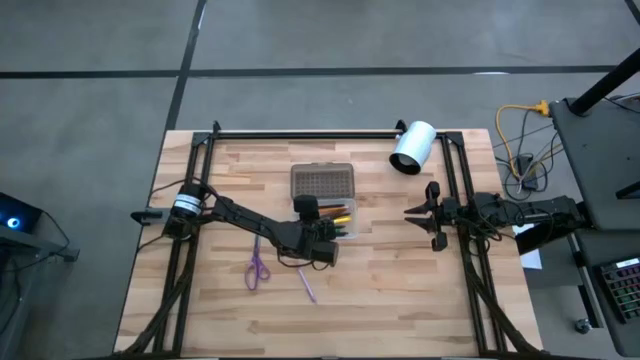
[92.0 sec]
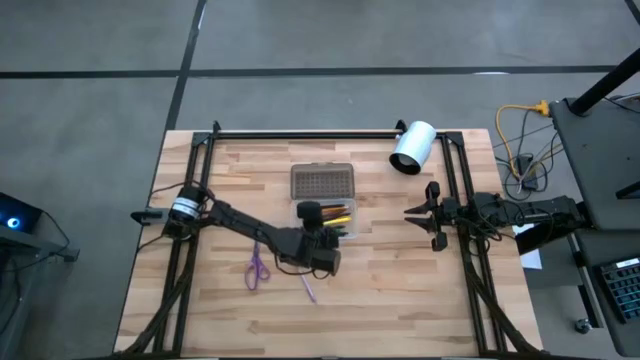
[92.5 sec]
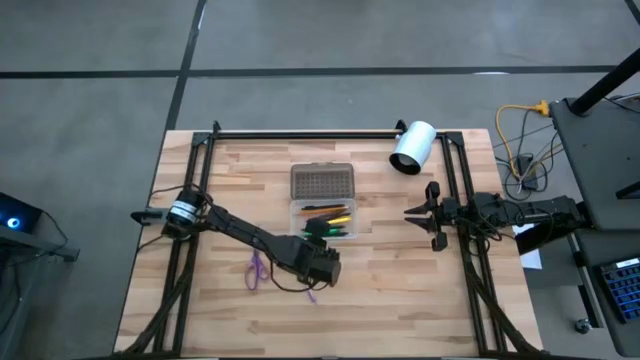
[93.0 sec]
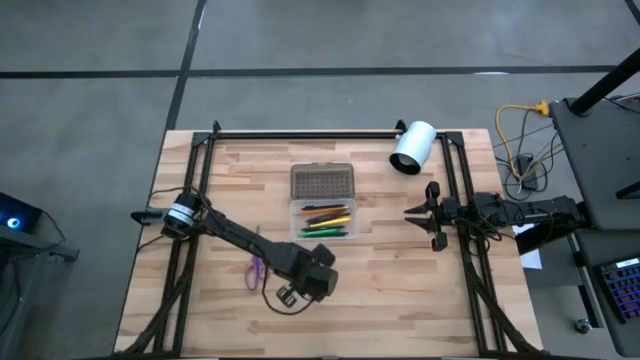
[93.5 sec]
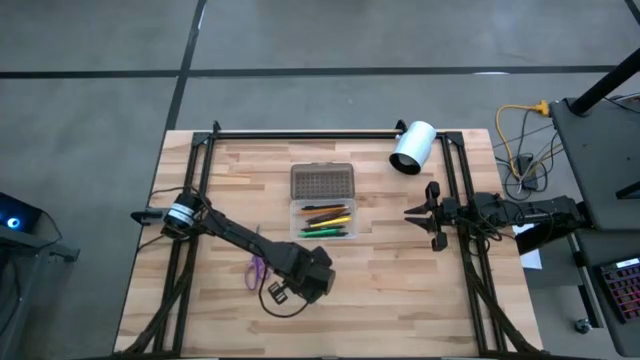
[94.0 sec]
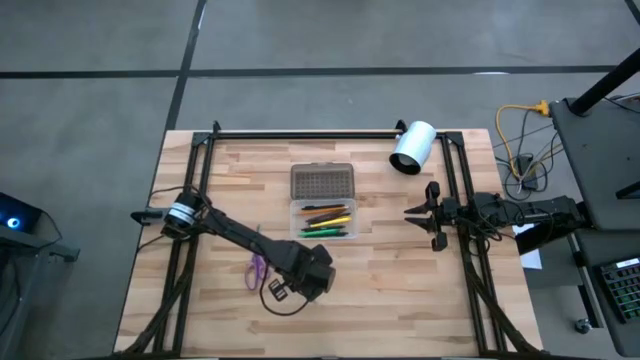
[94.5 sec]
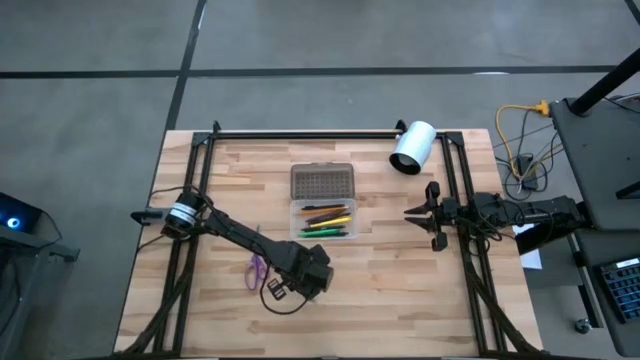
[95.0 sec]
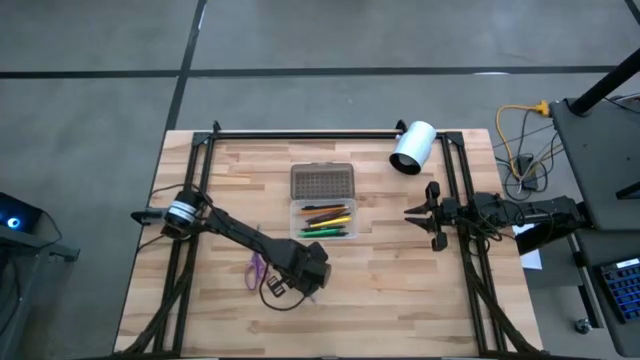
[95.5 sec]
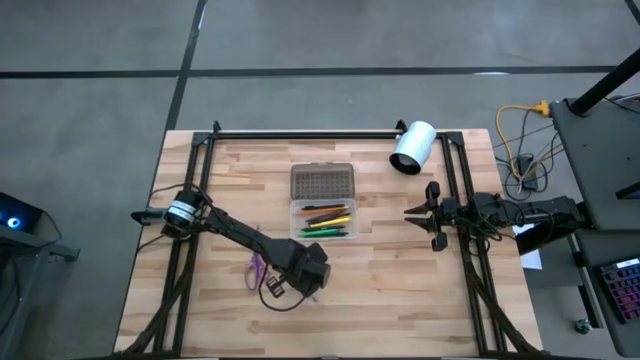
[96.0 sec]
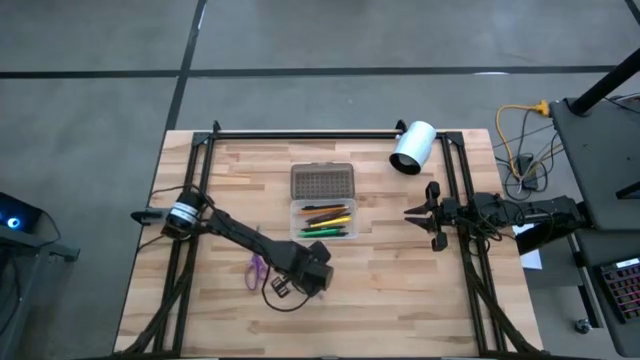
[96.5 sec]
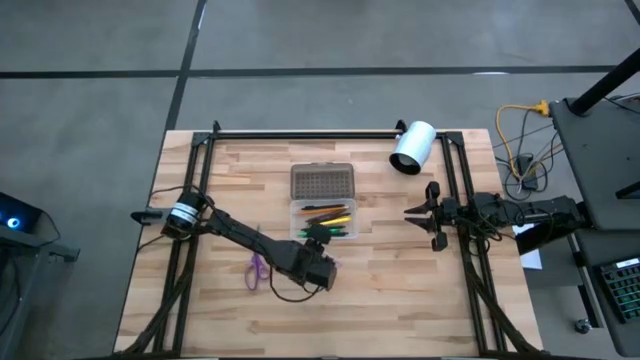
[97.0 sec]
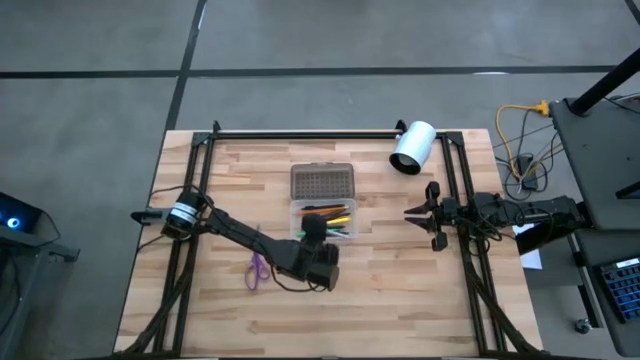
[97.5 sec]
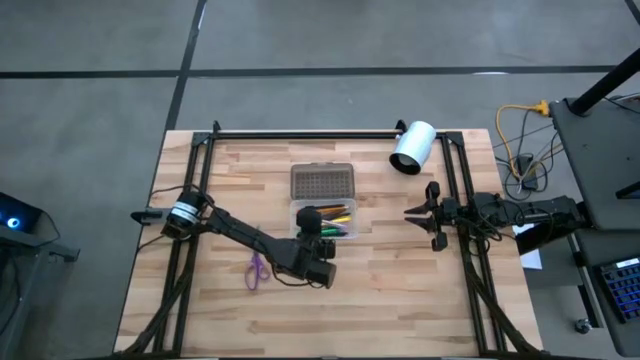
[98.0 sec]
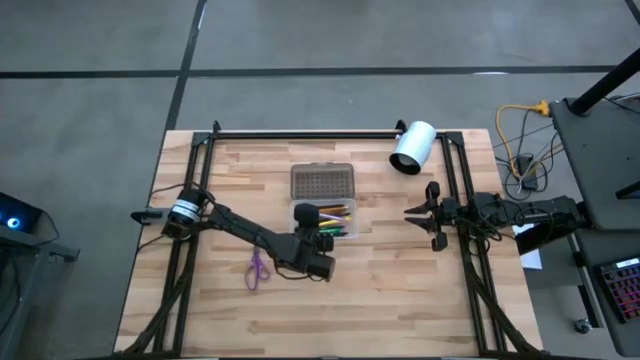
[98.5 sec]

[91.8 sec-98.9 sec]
Task: Pick & place school supplies into a supply box
Put the purple pen into the supply box

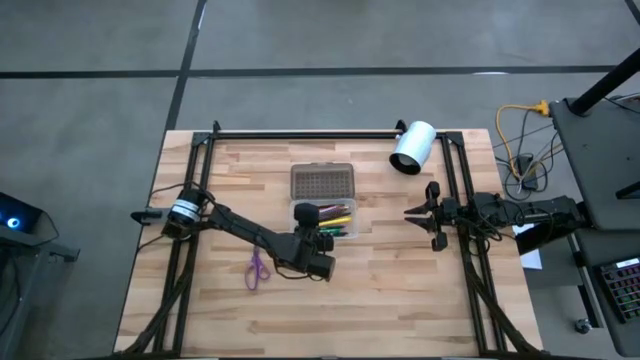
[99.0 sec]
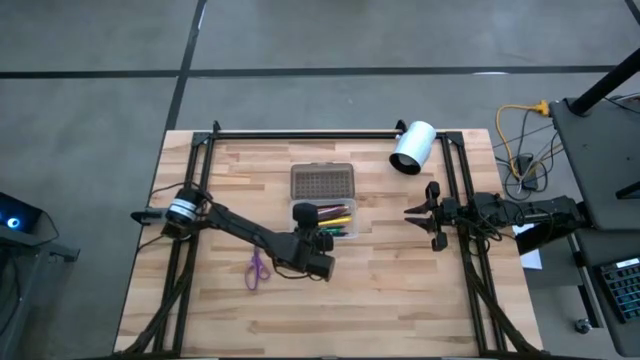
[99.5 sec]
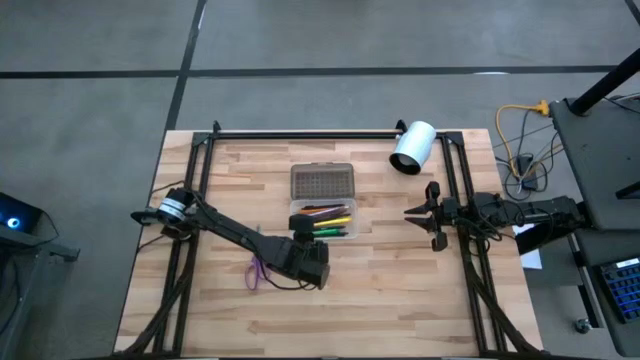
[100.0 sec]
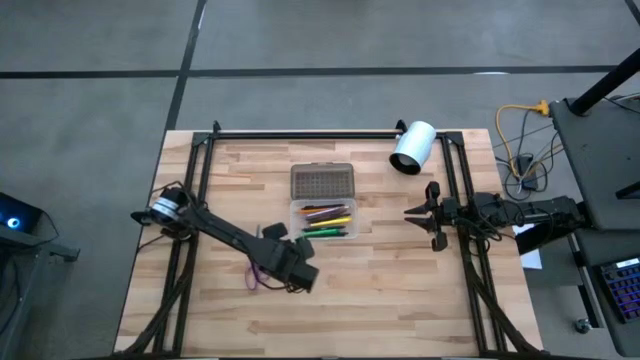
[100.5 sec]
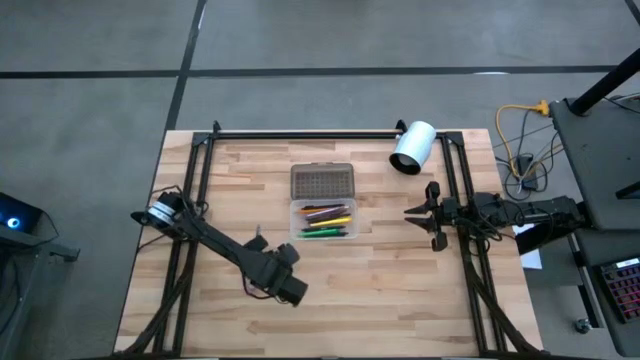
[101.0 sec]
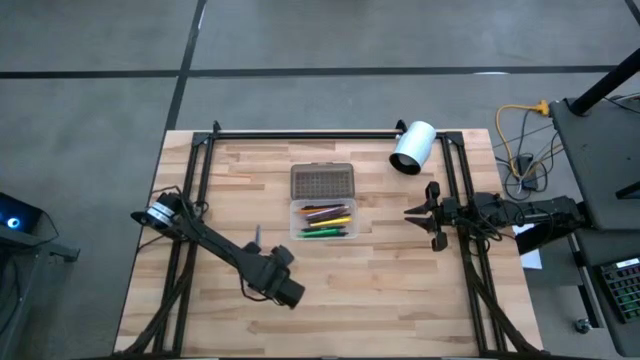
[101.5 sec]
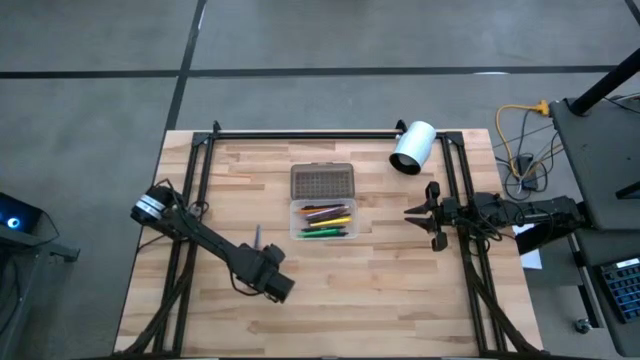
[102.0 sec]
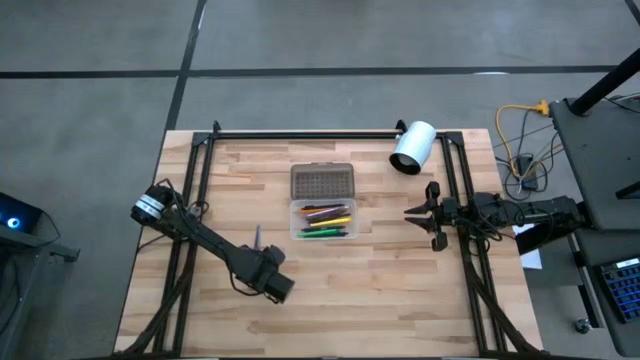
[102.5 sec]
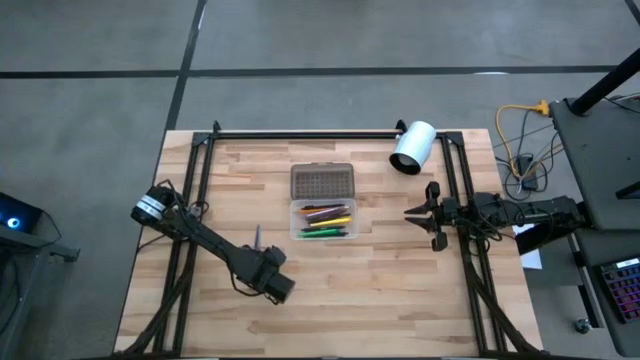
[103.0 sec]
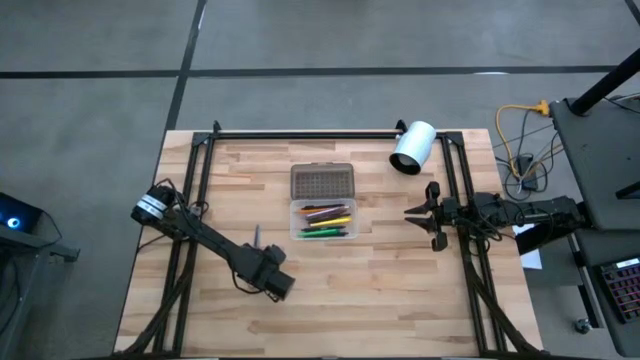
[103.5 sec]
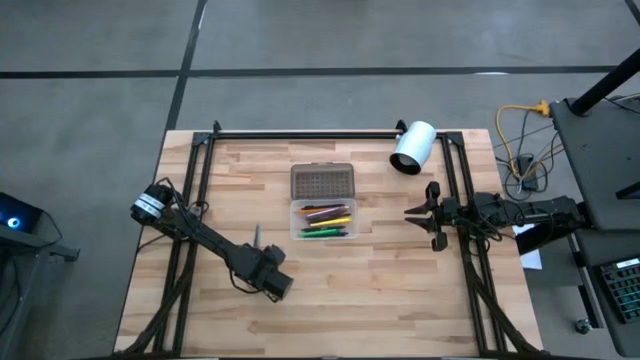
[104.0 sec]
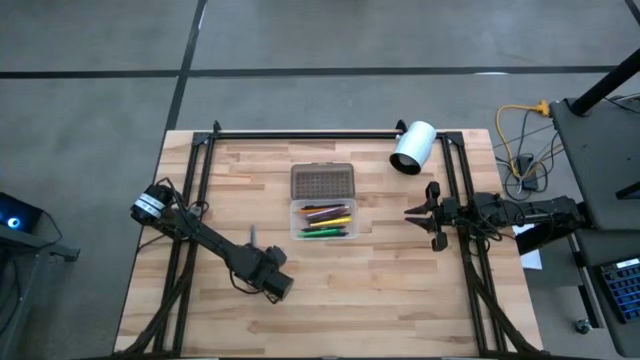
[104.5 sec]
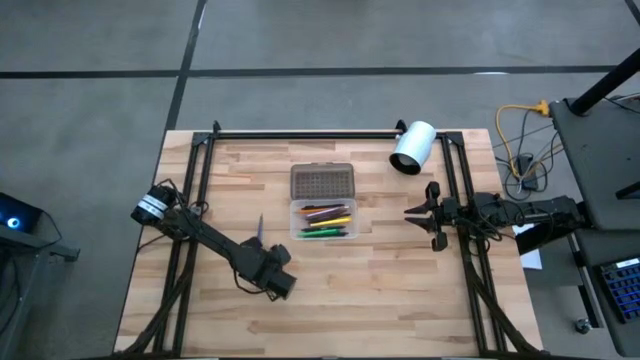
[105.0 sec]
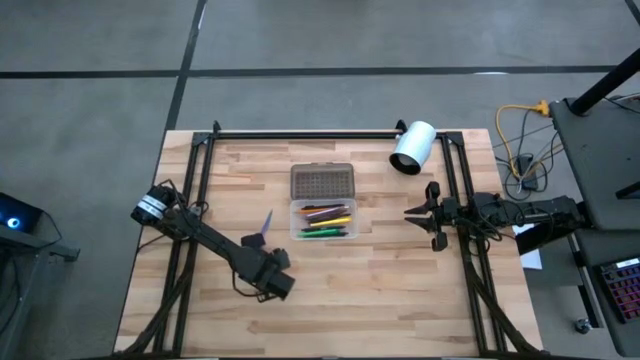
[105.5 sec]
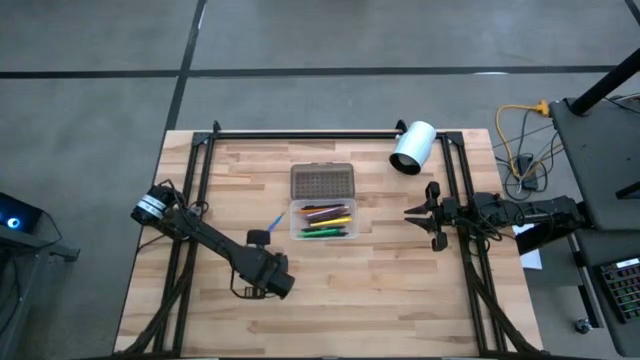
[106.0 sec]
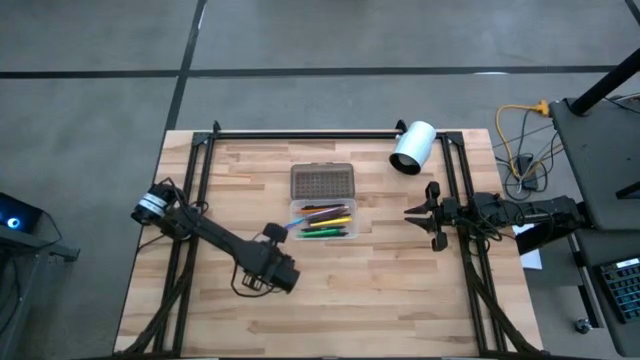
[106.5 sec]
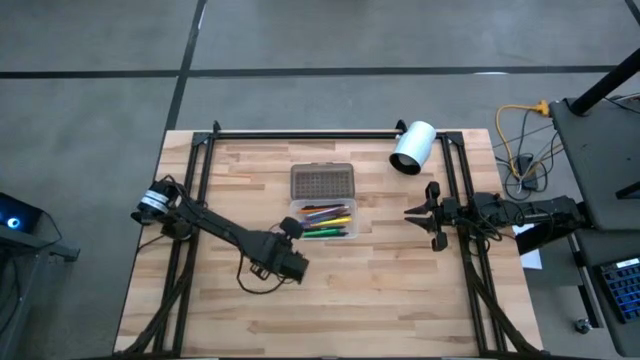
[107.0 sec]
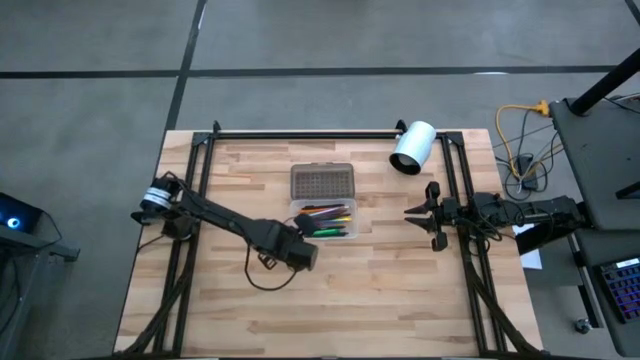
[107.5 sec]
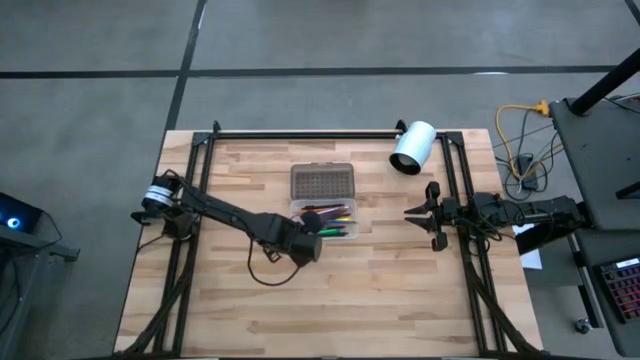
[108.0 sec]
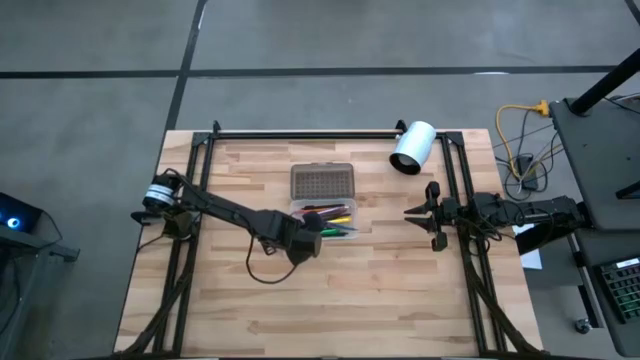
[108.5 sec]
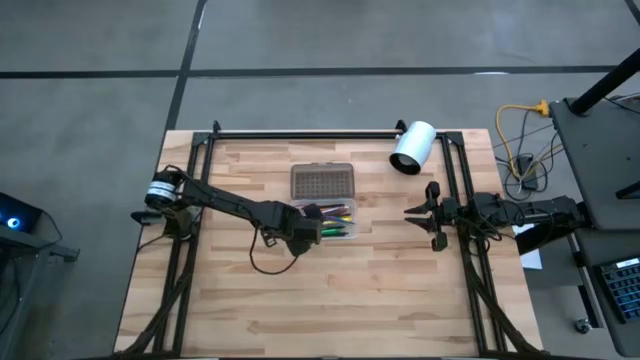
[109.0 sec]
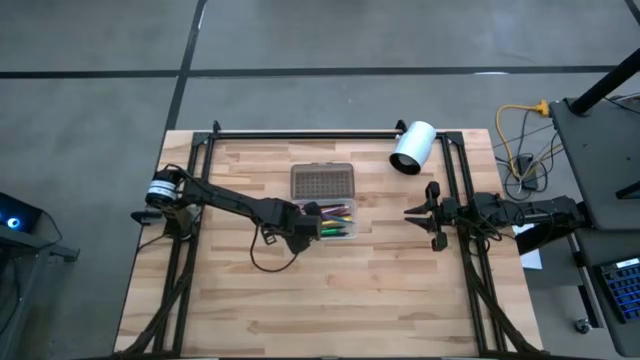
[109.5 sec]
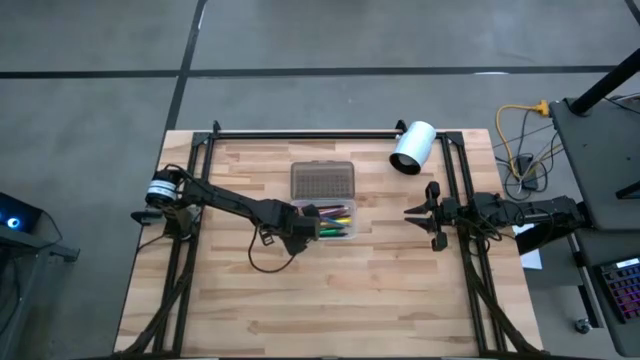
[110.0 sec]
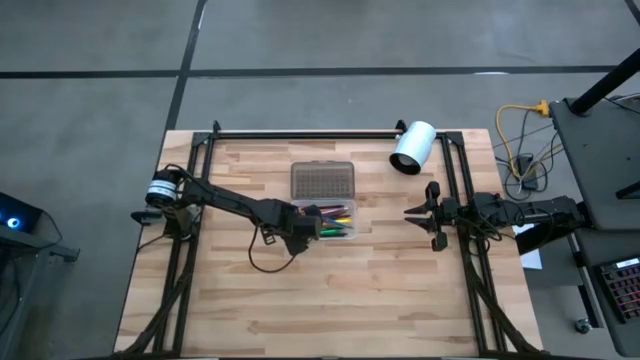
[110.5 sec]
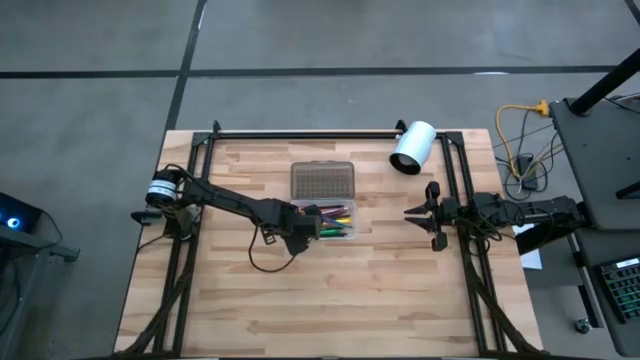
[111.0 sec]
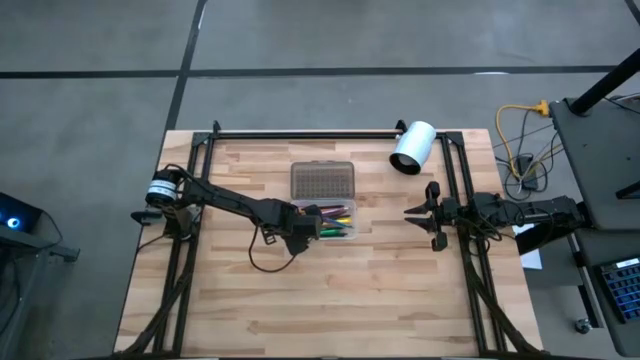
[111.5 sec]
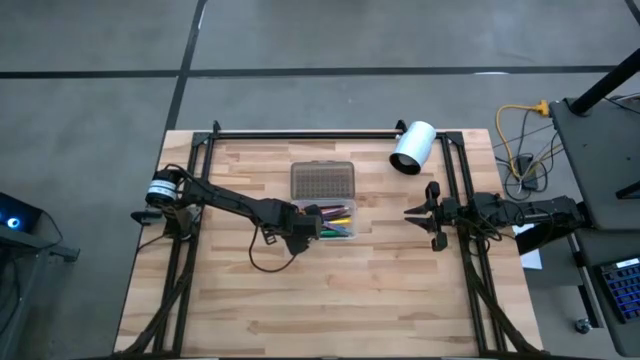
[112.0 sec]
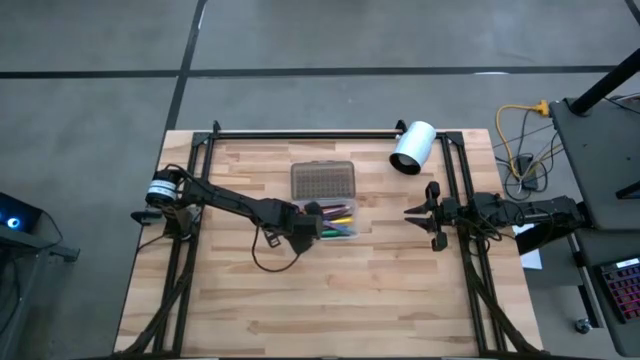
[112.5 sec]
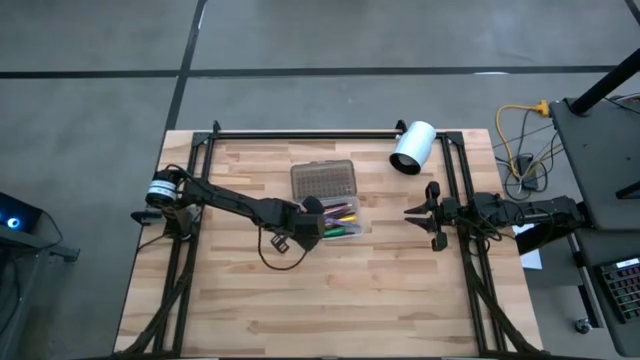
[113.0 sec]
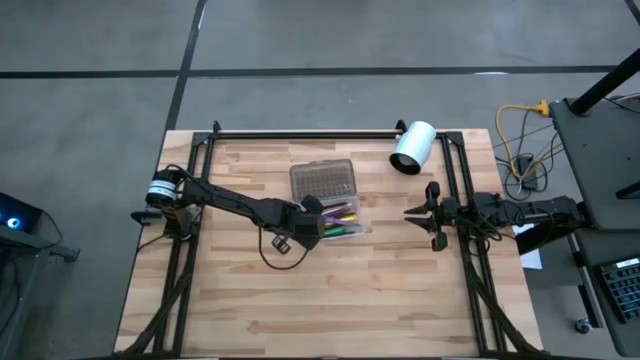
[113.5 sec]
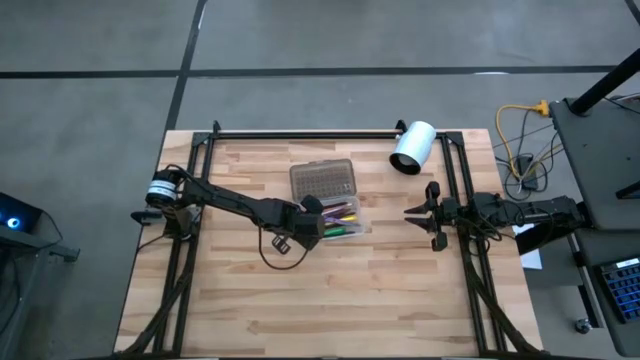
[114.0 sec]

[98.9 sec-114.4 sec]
Put the purple scissors into the supply box
